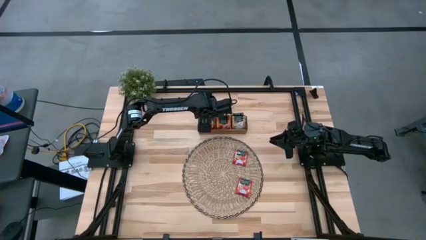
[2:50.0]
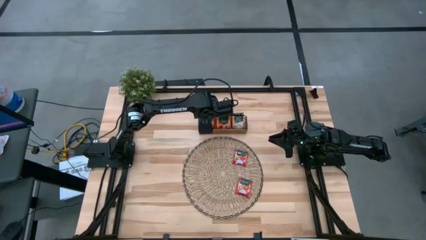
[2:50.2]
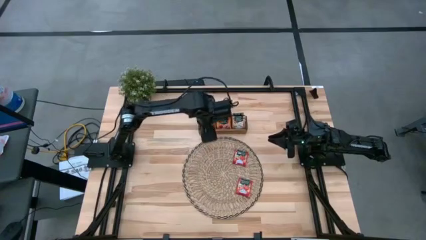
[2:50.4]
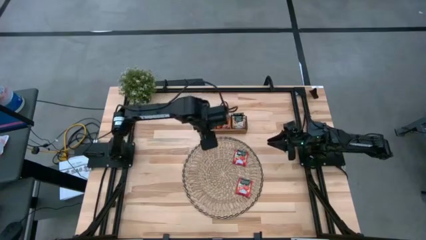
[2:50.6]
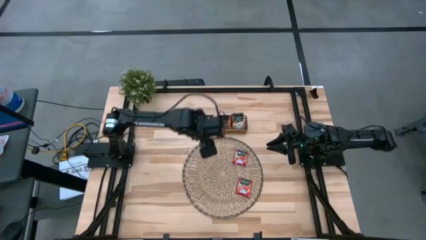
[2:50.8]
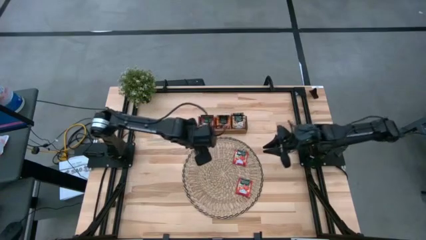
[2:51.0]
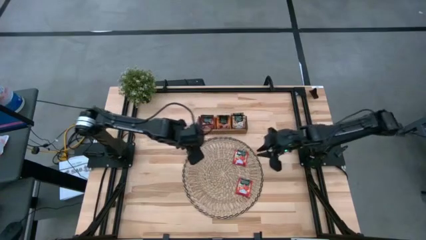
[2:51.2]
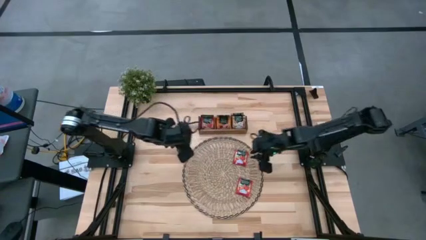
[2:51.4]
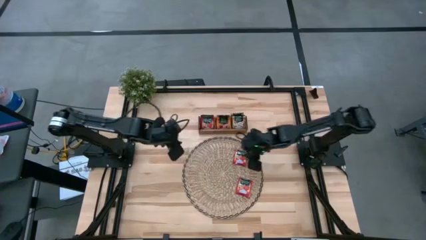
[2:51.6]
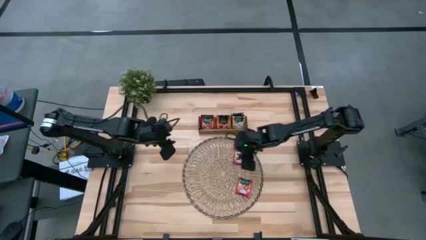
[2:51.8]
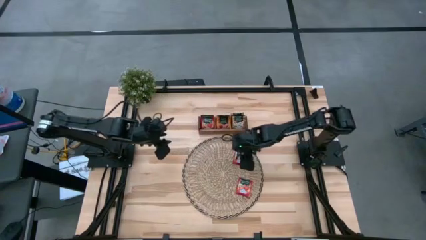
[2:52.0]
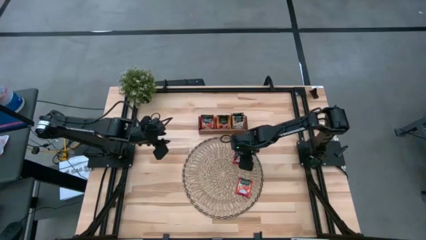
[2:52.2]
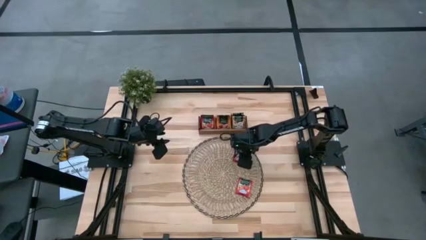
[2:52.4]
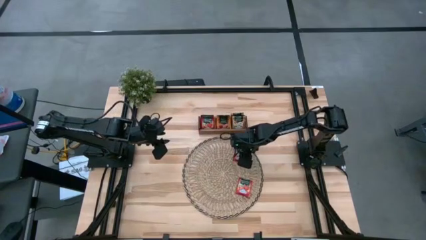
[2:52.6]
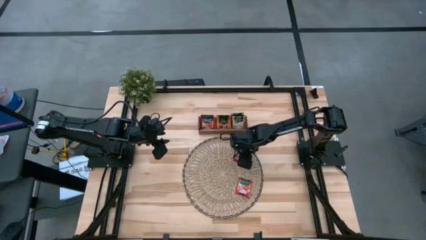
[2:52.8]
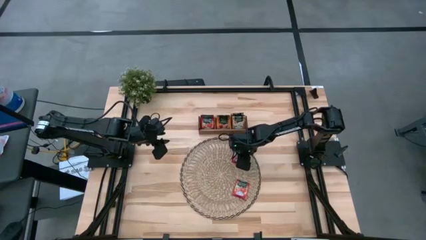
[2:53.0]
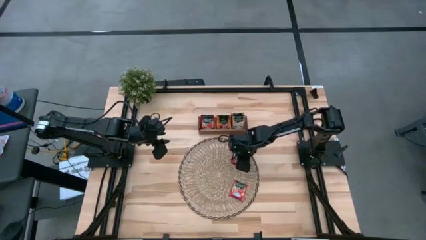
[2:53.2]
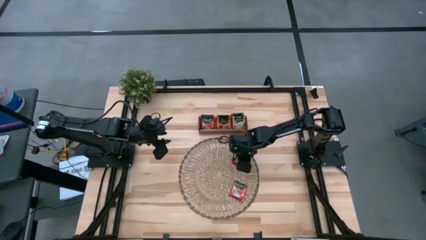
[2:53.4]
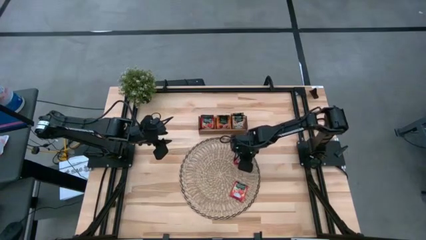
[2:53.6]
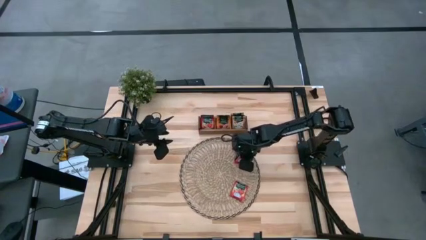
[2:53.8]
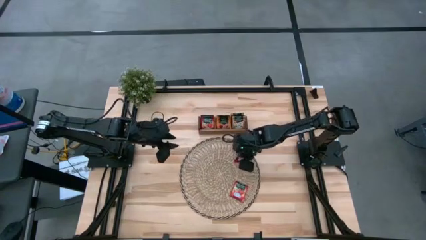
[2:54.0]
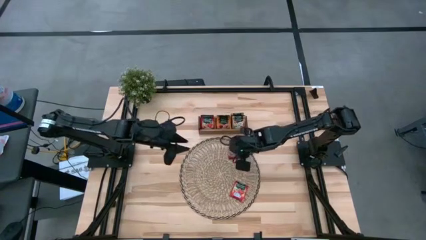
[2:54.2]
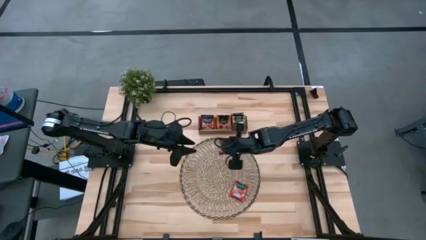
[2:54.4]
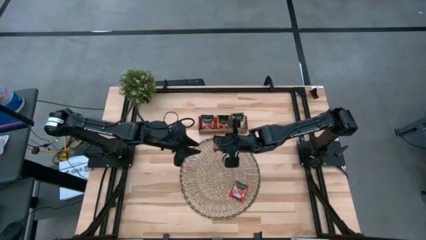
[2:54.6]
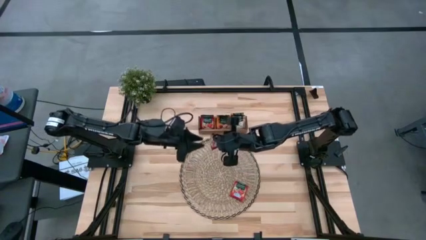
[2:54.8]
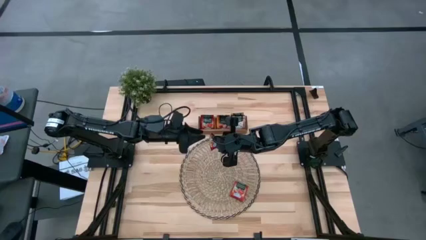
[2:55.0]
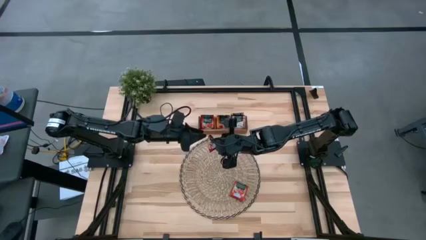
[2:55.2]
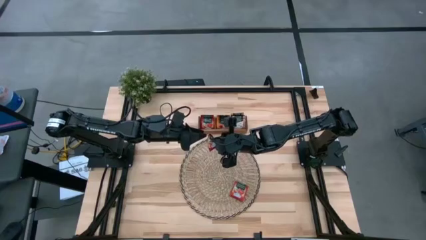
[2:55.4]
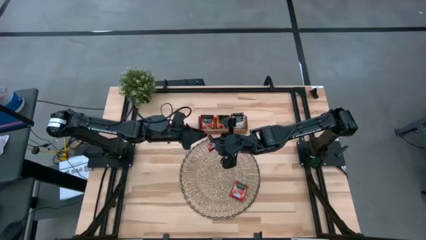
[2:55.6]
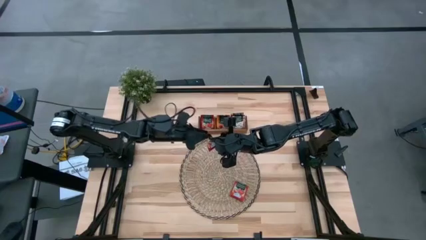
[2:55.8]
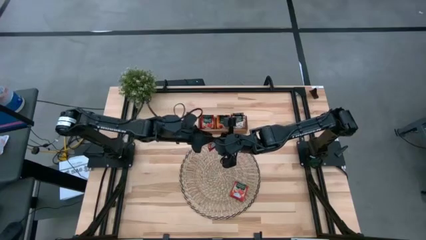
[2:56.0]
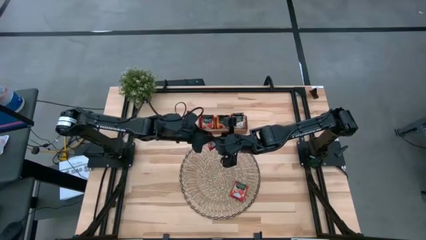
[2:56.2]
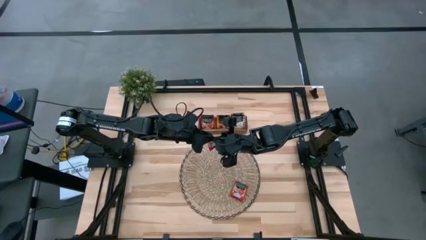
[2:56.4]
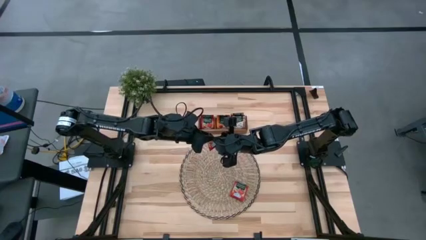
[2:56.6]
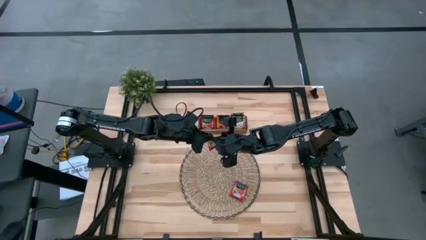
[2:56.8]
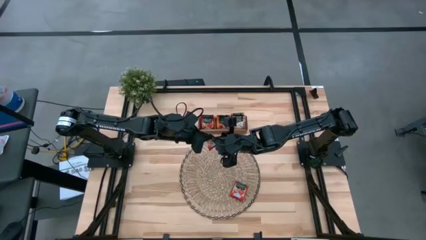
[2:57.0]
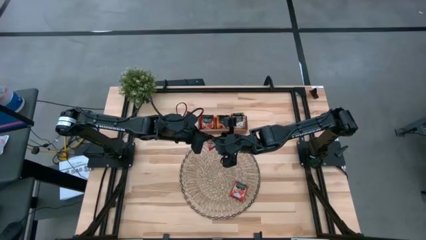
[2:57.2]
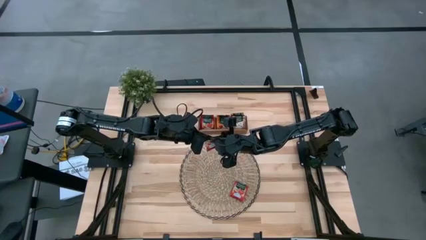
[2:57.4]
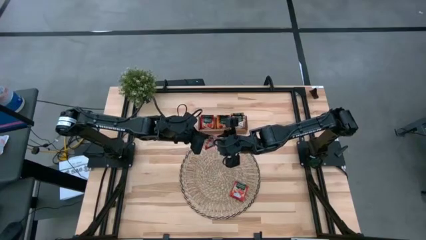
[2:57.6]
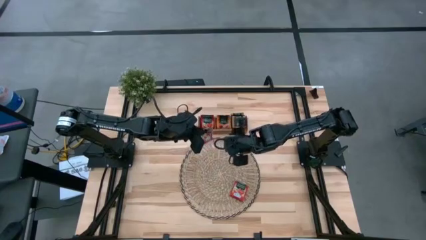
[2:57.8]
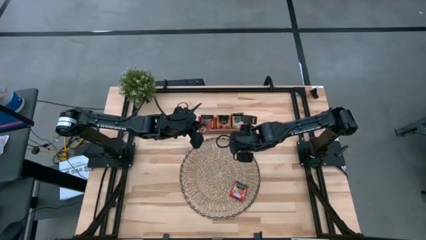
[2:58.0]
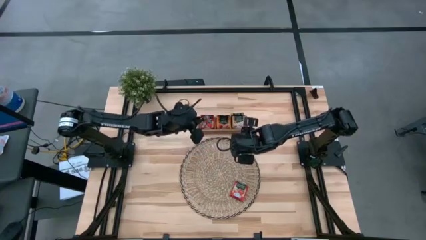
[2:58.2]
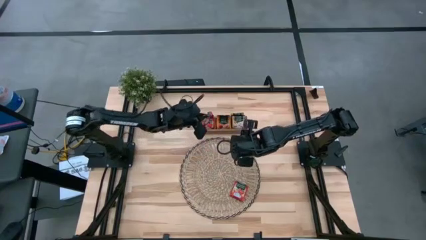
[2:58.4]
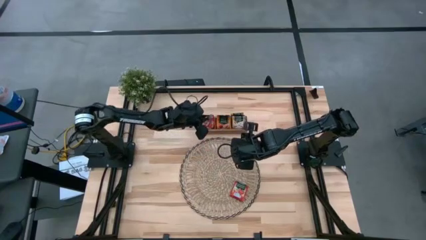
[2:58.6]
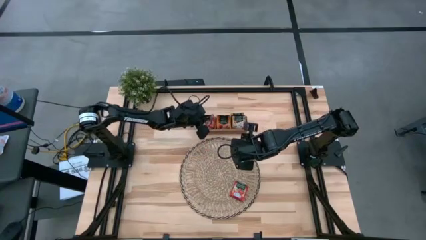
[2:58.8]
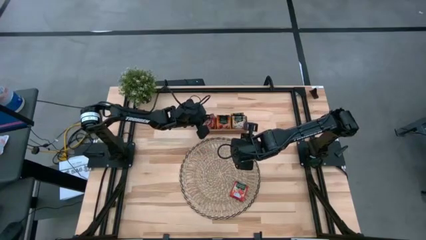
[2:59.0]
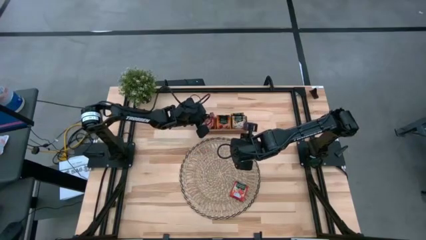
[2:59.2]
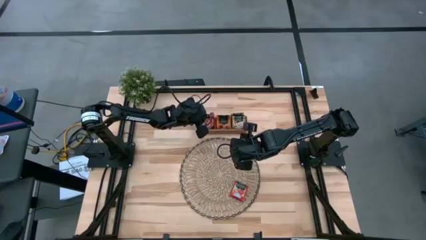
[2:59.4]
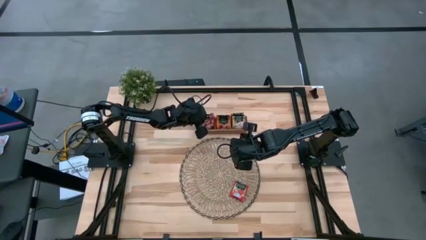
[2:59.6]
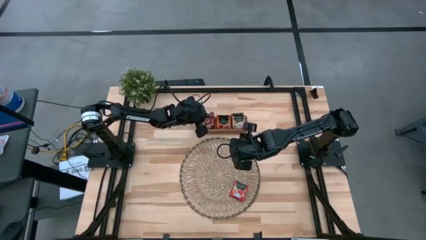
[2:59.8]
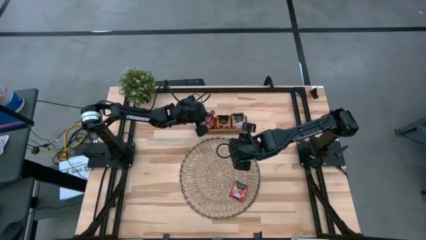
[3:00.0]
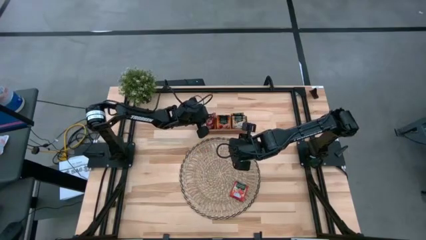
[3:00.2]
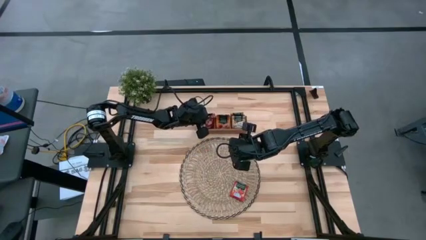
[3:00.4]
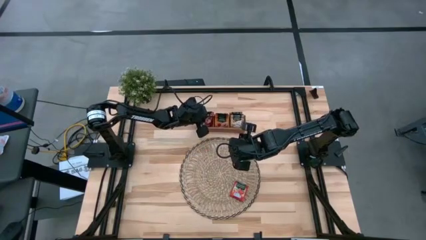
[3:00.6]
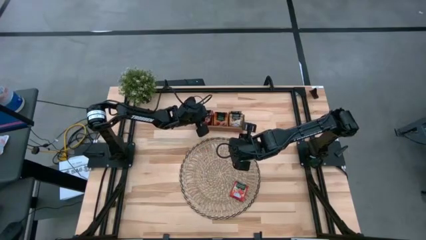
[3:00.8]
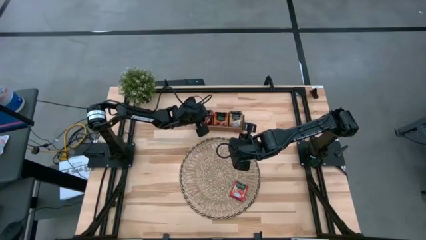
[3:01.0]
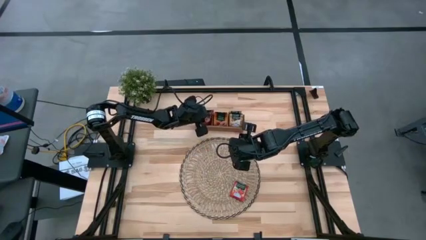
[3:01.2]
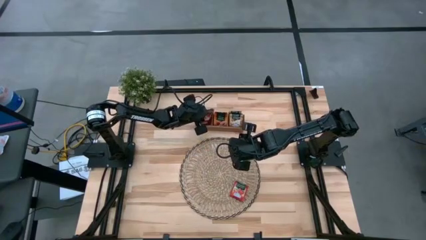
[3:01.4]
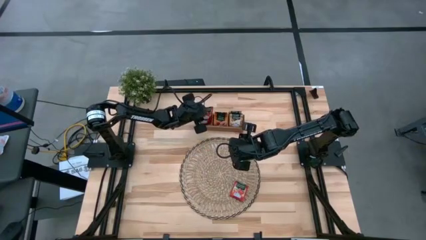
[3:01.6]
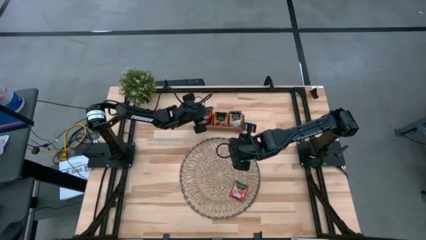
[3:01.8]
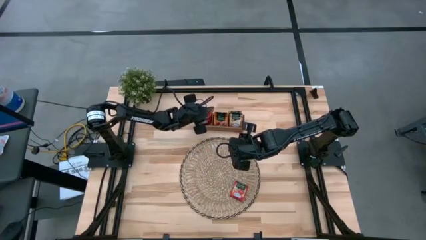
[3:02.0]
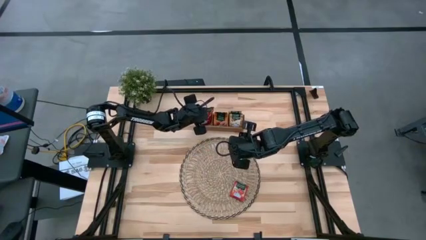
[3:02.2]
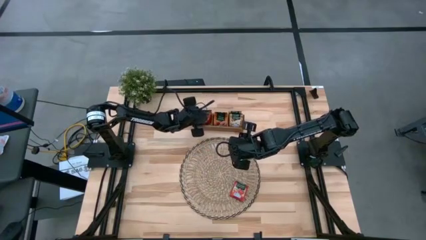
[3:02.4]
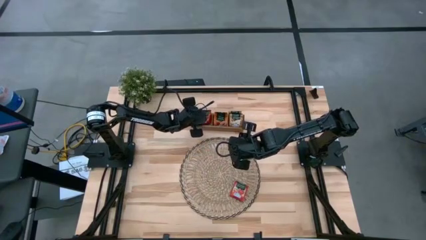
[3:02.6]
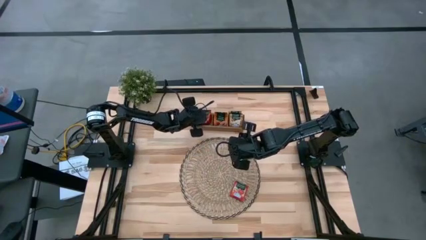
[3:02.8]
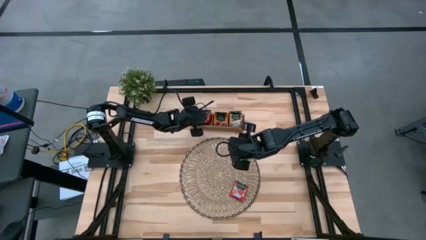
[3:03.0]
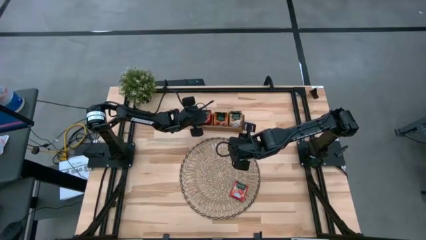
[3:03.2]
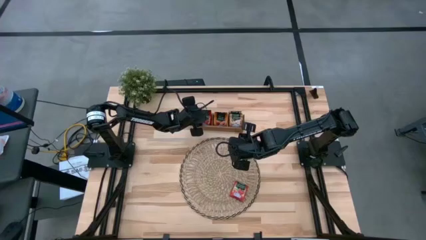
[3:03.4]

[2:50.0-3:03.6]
Task: Pick & Place Tea
Put the red tea bag into the left section of the wooden organizer

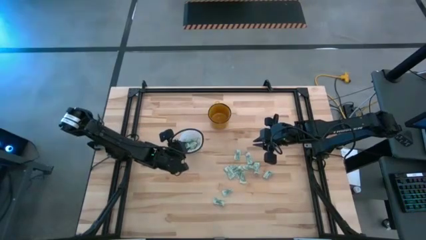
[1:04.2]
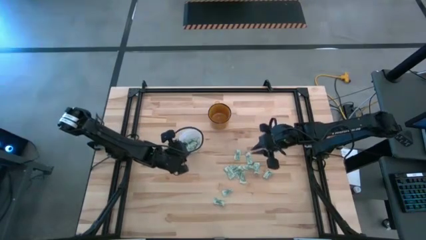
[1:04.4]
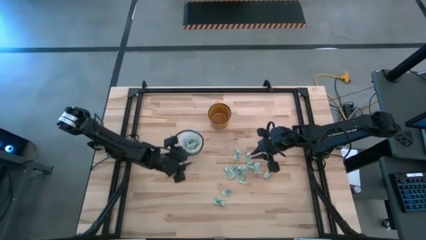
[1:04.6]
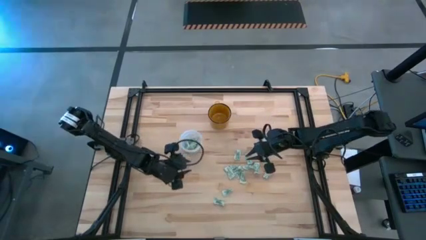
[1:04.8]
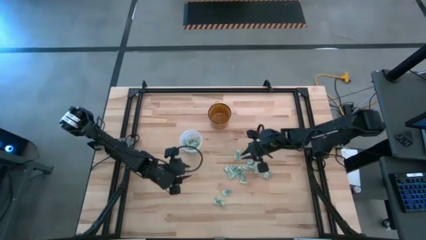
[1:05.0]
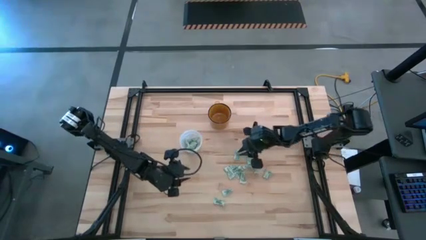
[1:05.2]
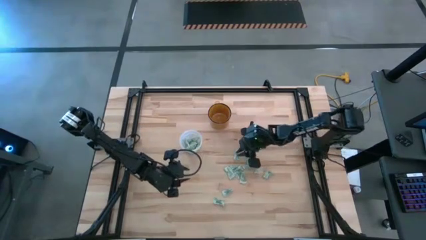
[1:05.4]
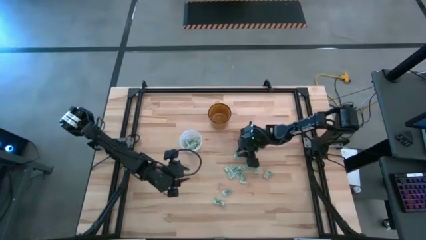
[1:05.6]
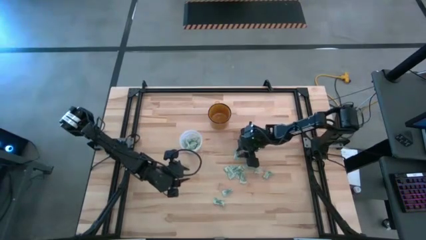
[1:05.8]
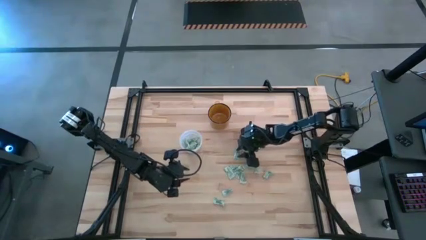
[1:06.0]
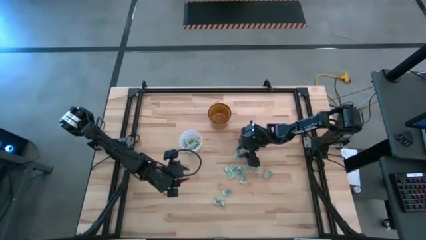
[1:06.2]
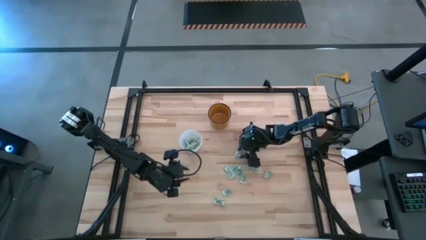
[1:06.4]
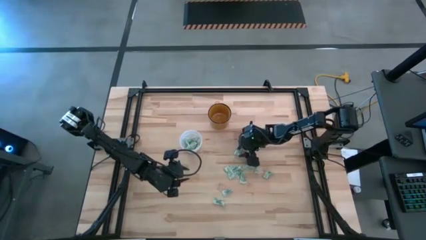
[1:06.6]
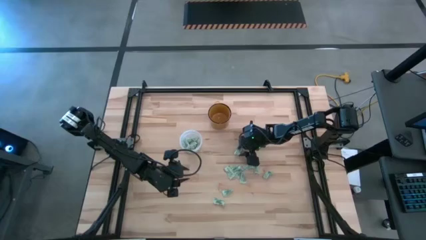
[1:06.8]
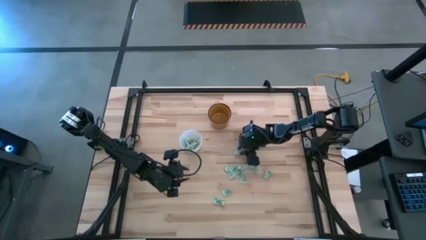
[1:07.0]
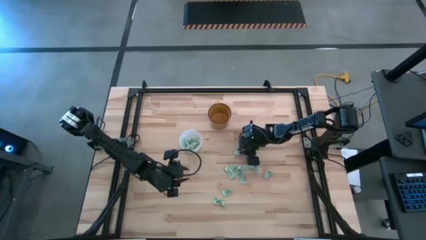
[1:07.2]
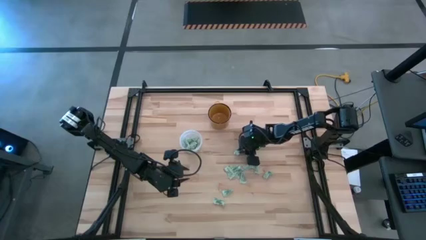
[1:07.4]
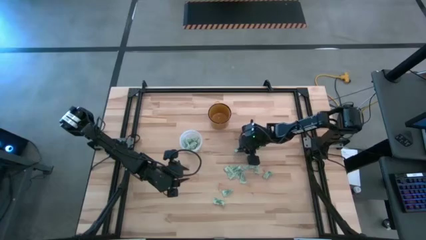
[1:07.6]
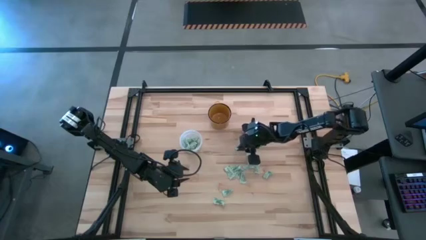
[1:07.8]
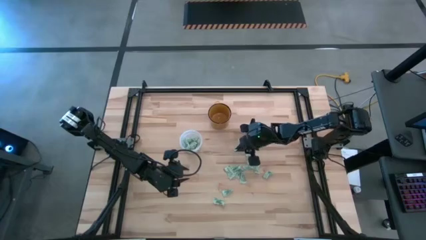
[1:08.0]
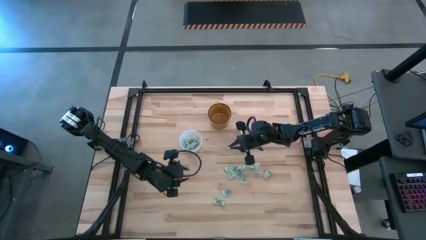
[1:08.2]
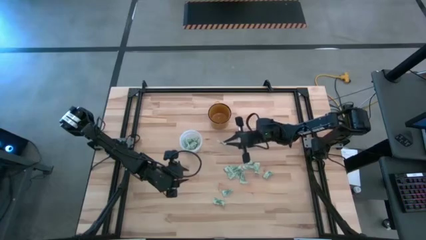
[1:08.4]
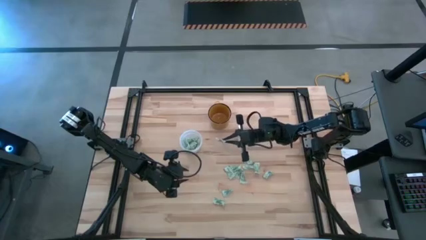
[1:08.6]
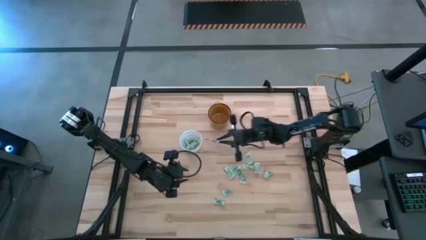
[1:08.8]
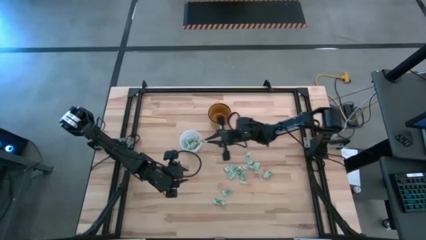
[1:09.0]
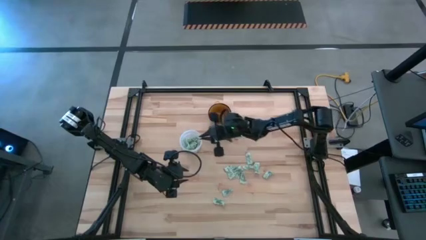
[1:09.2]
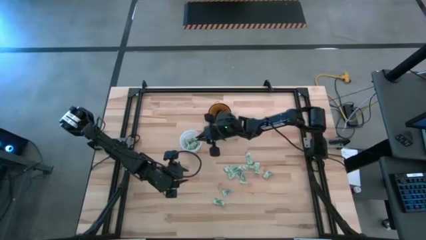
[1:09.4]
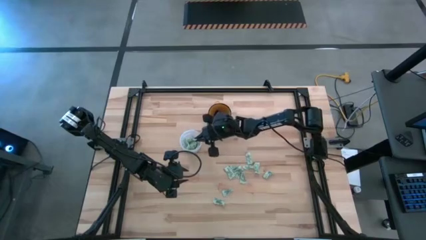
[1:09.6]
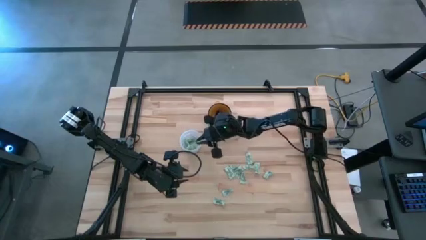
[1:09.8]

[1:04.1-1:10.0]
Task: Pick and place Stevia / Truvia into bins
Put the stevia packet into the transparent bin
